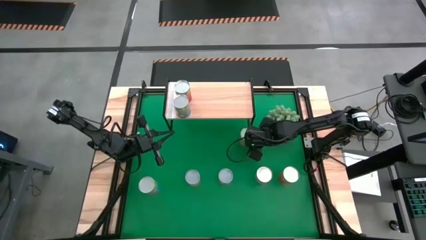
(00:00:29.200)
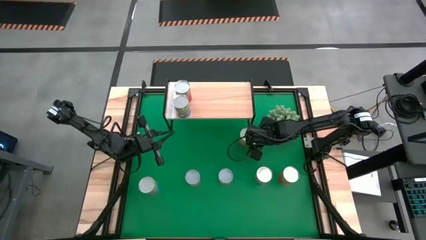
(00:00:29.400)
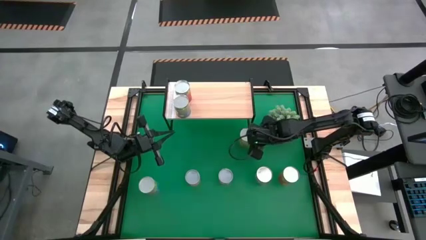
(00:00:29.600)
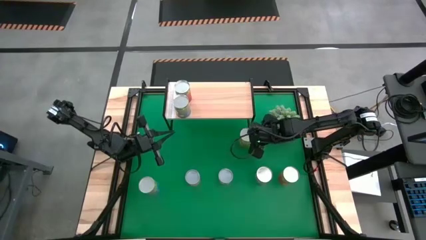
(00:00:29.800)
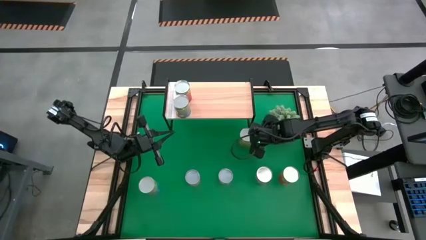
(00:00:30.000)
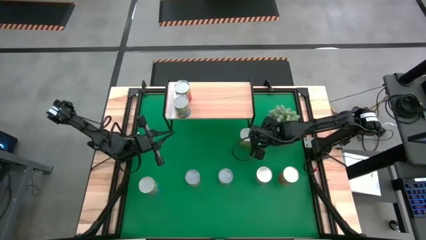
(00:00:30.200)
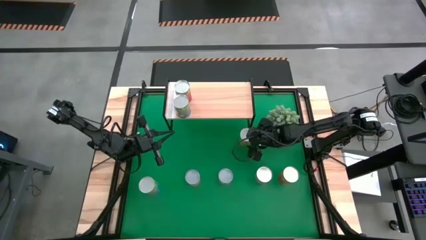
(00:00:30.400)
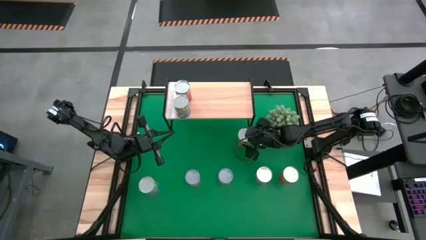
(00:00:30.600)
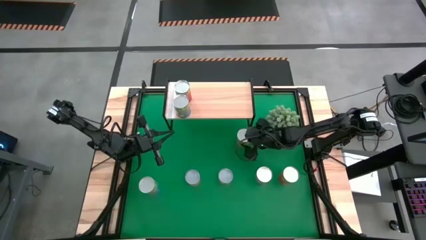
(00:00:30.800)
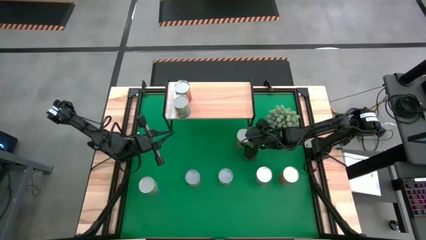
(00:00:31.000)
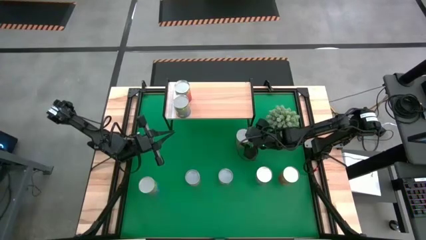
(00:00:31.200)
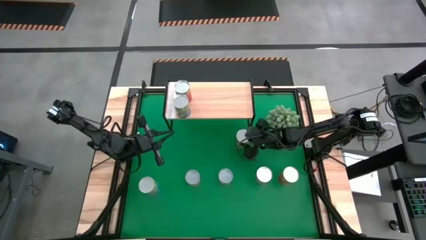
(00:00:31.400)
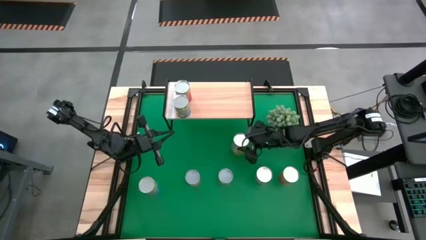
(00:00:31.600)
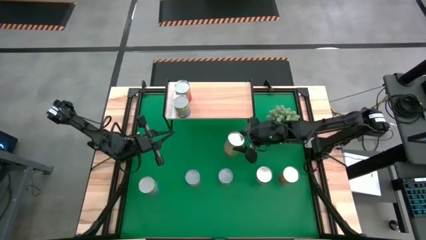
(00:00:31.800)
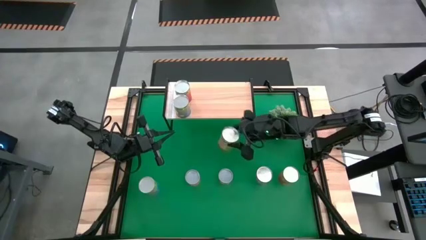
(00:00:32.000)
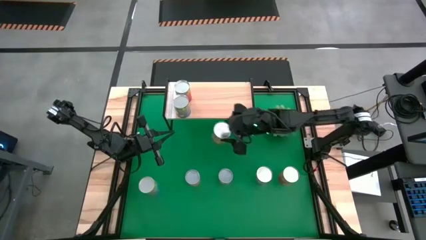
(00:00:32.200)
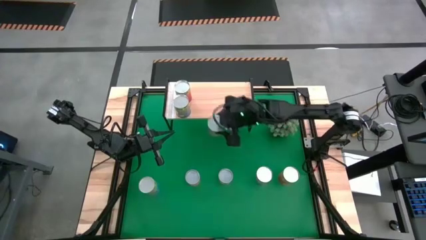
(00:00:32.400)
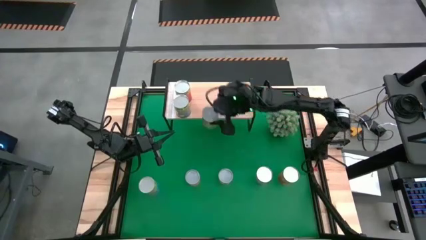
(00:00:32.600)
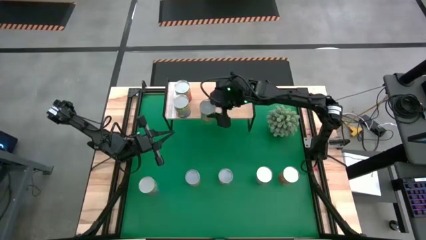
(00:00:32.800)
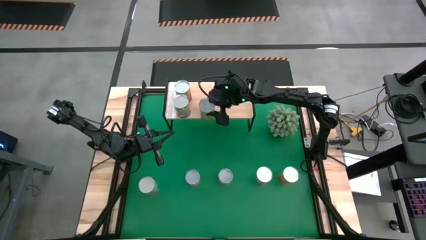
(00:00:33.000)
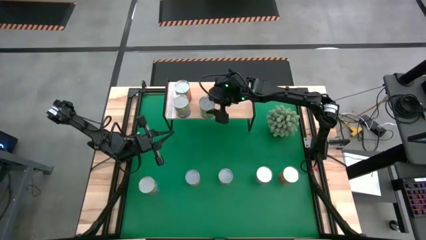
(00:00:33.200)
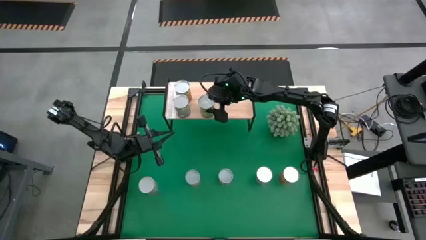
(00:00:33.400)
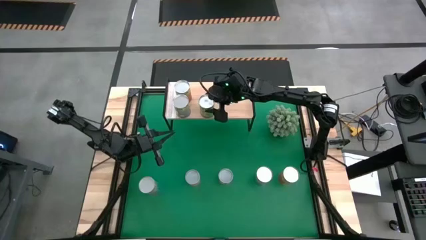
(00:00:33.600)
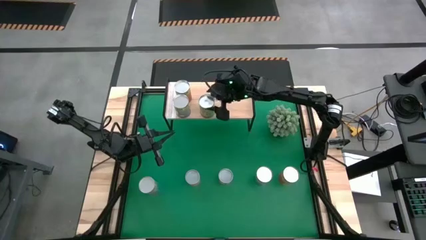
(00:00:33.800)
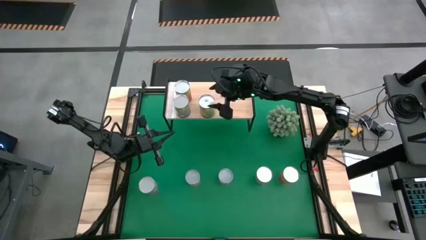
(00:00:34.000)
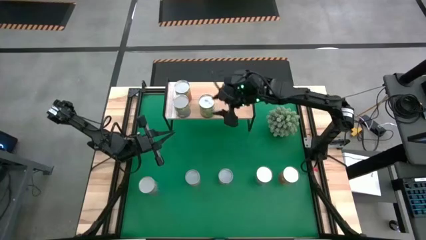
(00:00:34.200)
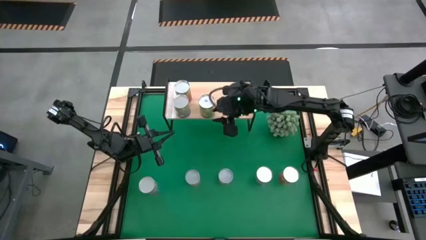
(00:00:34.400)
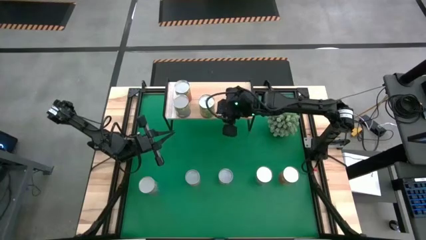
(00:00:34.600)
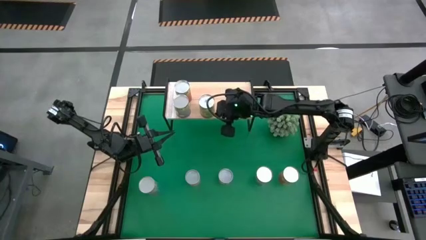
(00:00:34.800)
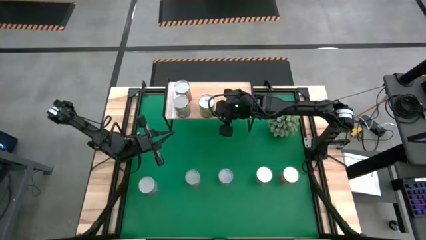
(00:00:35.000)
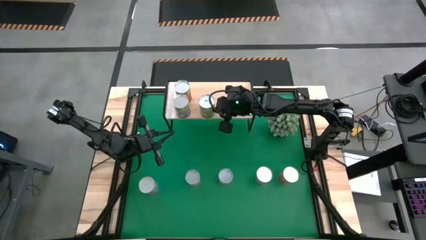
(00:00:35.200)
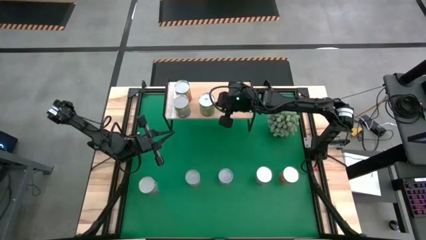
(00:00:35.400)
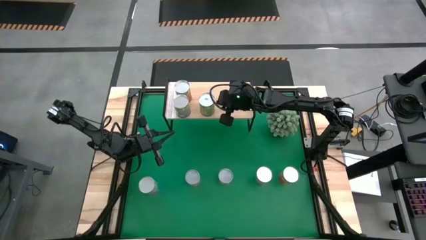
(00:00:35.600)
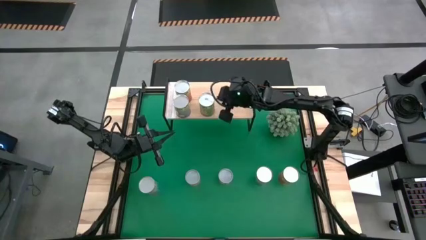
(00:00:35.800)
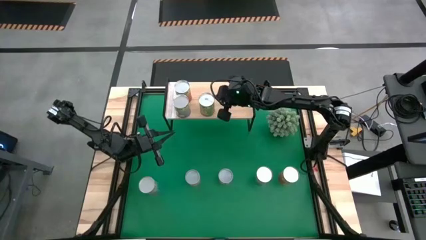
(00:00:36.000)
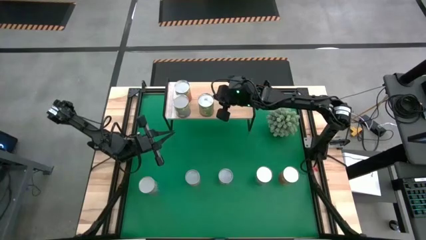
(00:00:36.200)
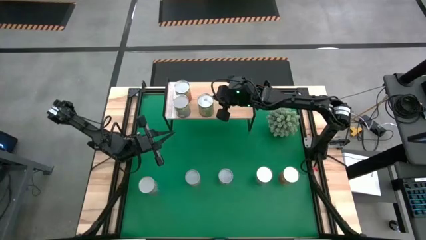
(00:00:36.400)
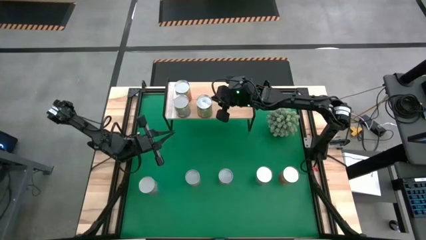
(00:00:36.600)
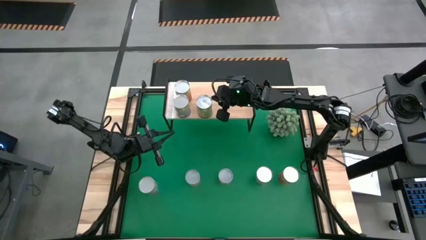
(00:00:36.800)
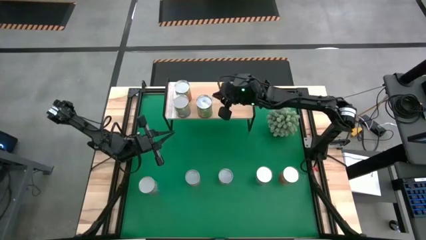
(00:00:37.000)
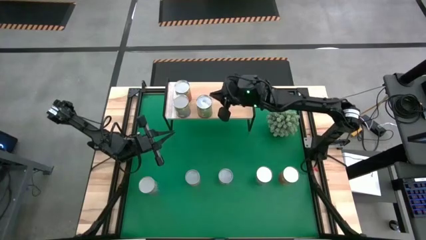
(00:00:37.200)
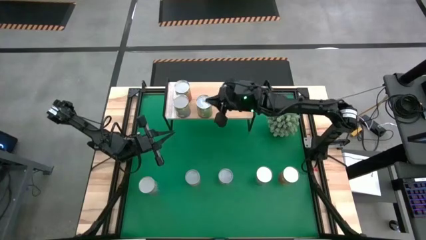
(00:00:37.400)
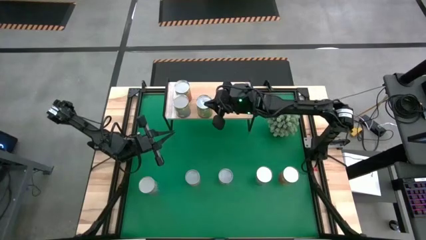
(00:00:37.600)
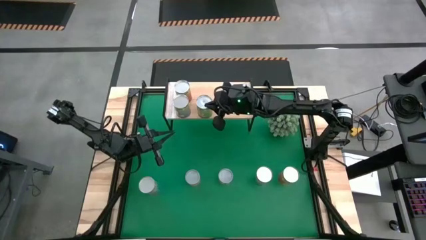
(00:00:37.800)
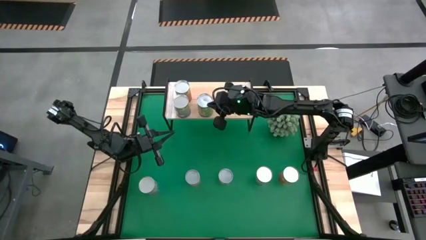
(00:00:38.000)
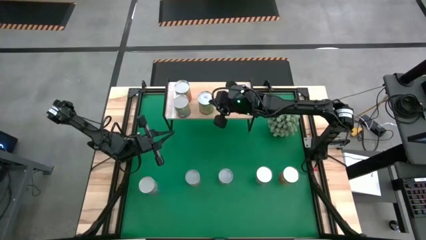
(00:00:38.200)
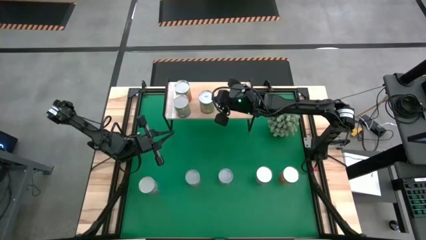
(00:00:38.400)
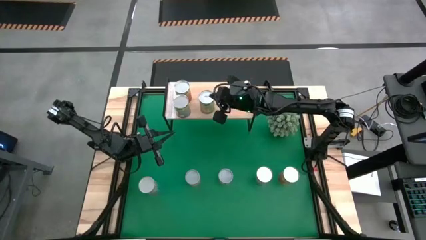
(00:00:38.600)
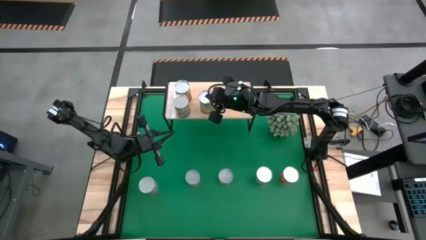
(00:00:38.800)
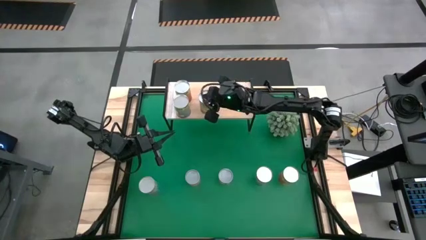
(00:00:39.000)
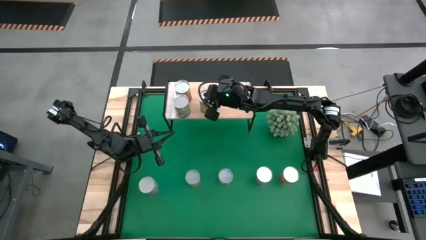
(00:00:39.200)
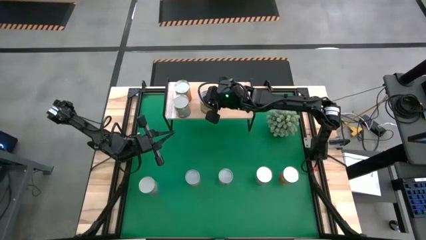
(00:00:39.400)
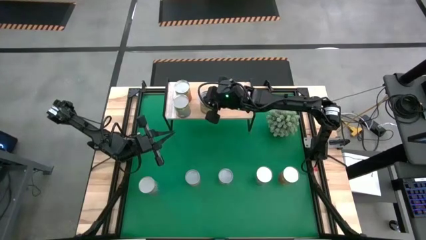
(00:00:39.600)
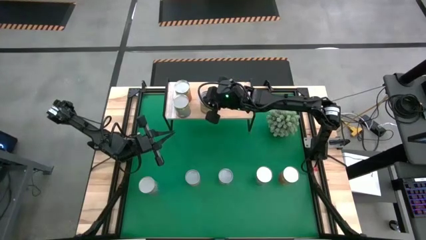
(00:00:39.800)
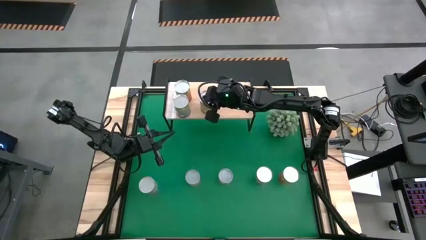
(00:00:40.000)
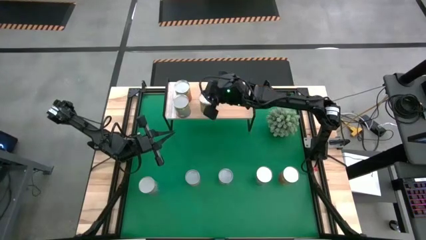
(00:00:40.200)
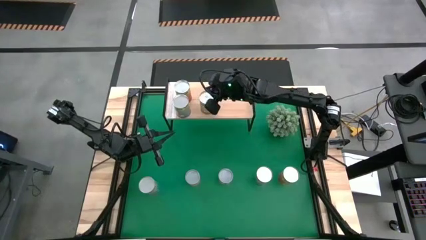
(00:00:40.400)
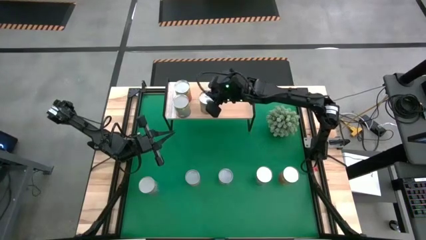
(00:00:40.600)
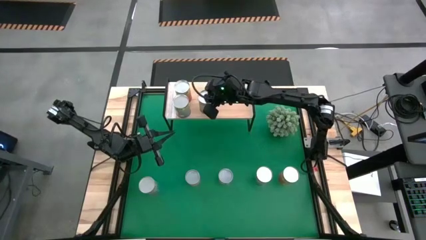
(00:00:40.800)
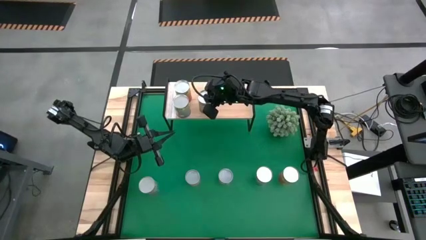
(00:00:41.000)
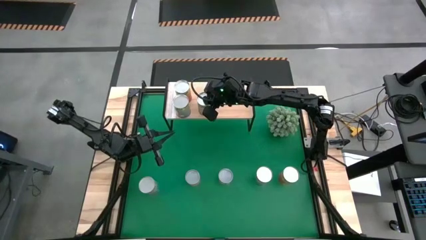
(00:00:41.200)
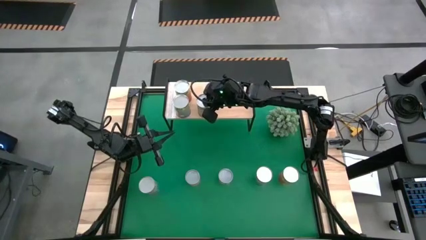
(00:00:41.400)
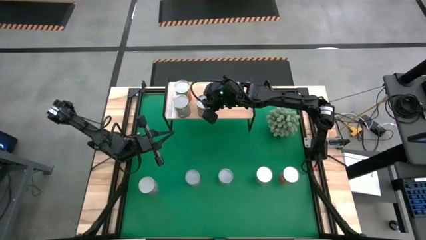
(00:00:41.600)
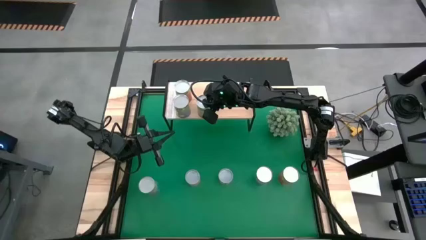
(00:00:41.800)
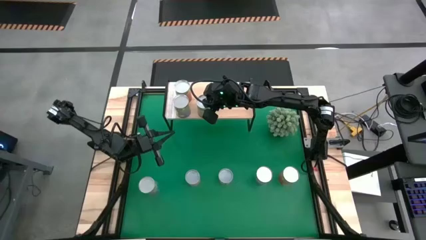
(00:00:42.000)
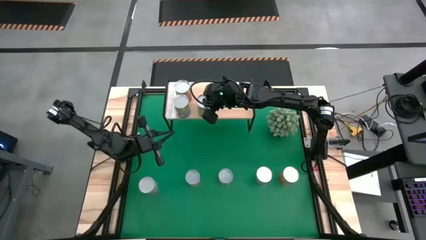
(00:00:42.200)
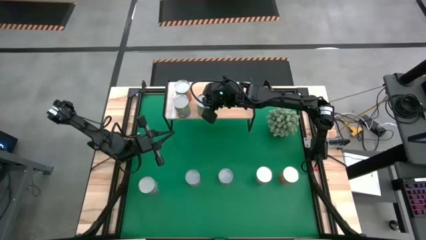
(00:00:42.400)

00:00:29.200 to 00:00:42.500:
Task: Pick and place cans onto a shelf
Put the canned oranges on the shelf

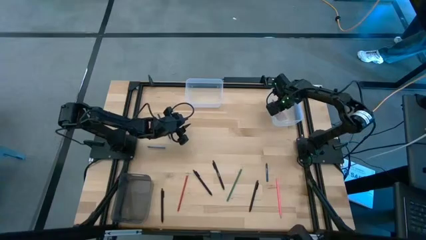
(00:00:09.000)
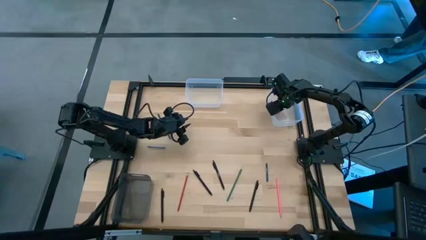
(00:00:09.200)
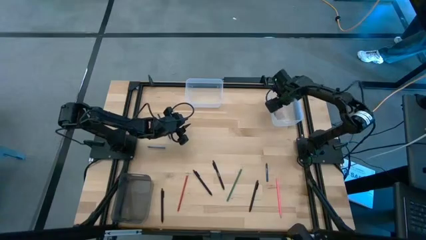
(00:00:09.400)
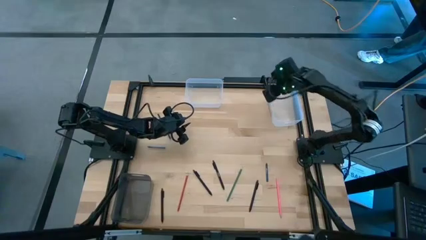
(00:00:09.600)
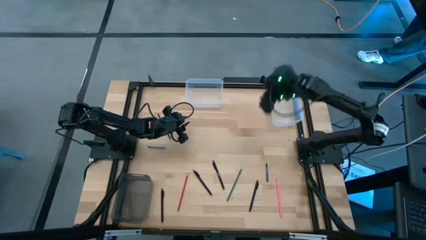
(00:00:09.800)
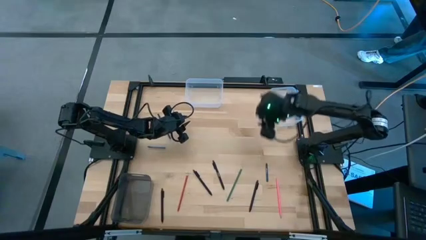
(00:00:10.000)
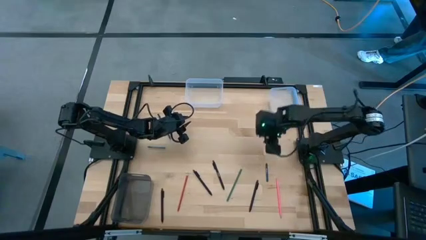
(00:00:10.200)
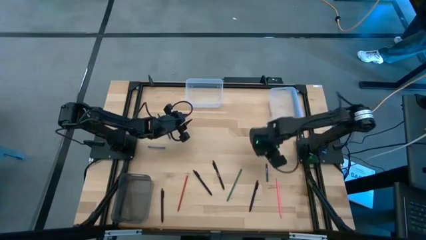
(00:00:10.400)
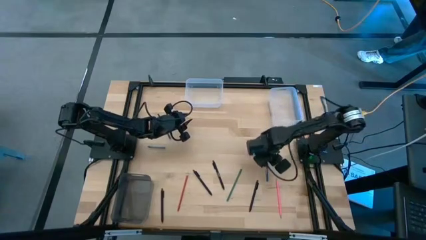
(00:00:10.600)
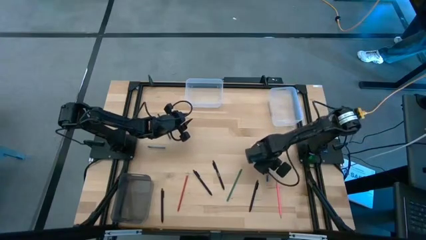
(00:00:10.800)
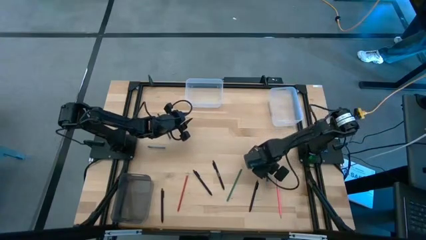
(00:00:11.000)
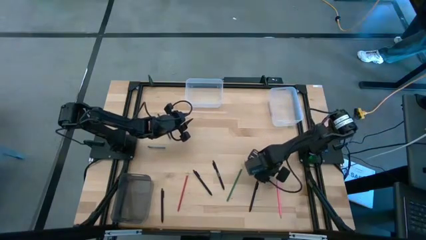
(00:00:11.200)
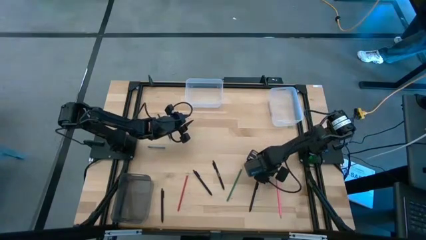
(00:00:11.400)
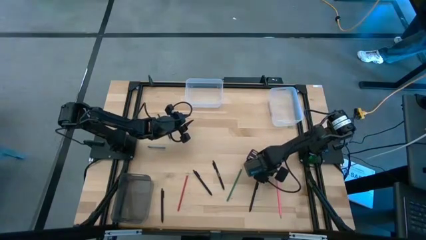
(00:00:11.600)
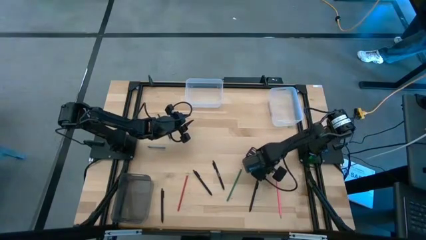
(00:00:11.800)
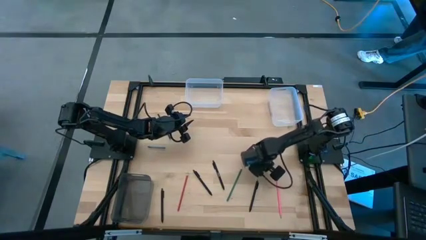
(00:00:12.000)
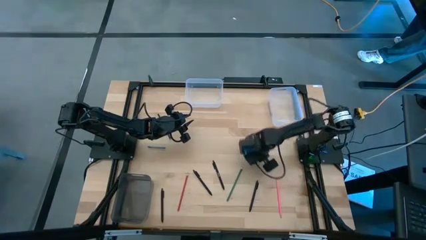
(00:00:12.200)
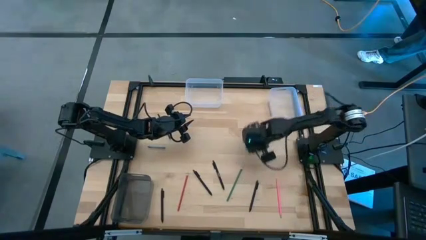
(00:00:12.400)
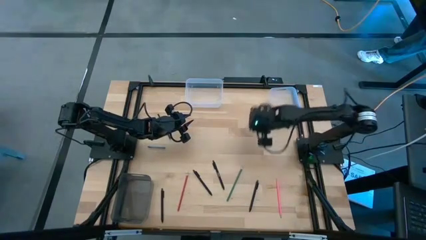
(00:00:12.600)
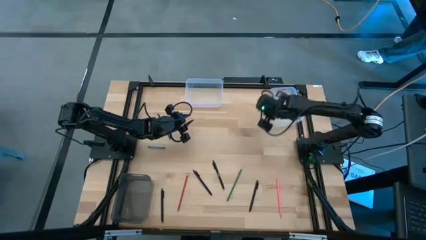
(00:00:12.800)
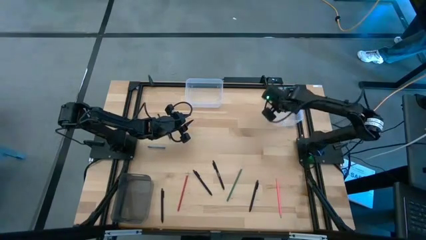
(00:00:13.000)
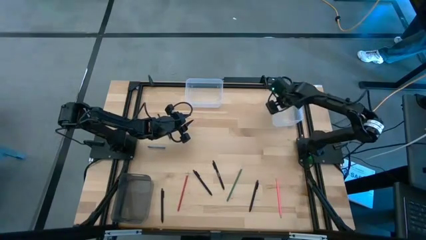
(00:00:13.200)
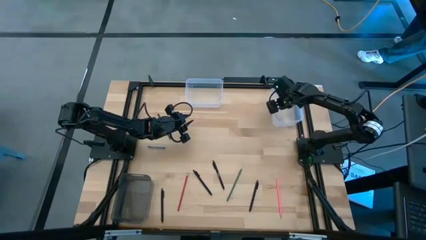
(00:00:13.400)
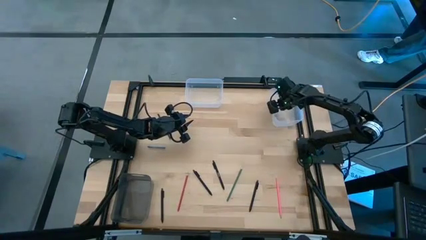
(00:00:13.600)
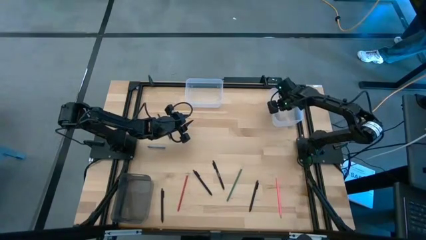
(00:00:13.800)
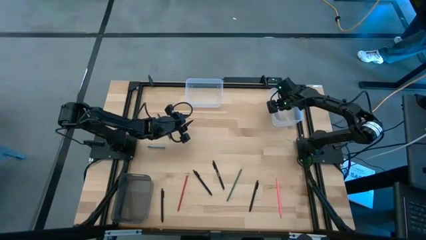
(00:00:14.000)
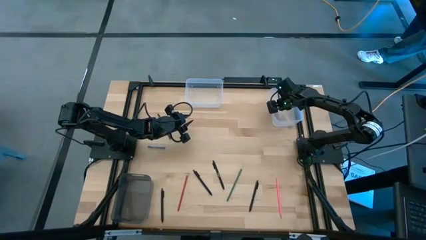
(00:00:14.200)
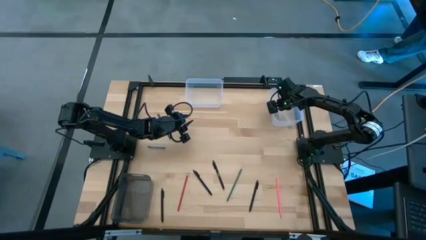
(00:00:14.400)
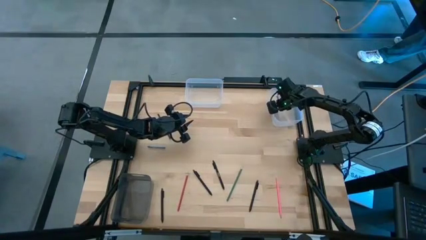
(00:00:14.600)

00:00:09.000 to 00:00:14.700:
Task: Sort crayons/erasers/pens/pencils in bins
Put the blue crayon into the right transparent bin
